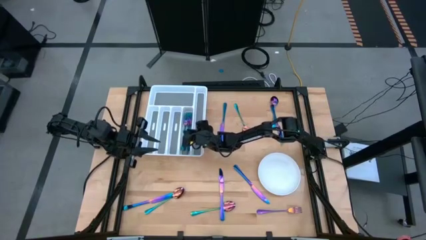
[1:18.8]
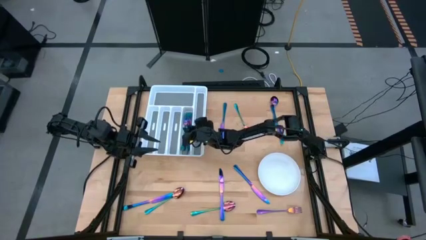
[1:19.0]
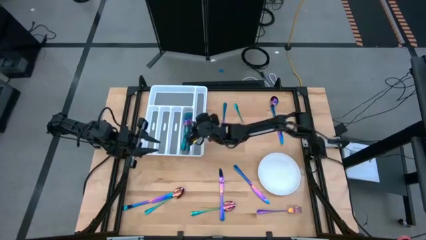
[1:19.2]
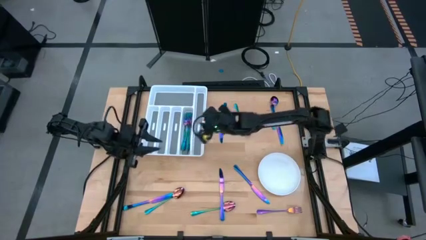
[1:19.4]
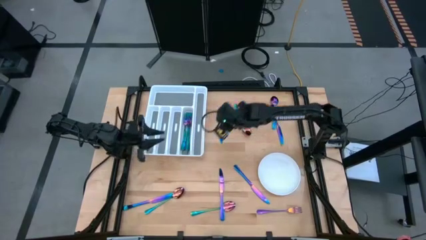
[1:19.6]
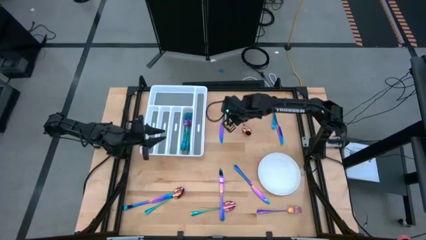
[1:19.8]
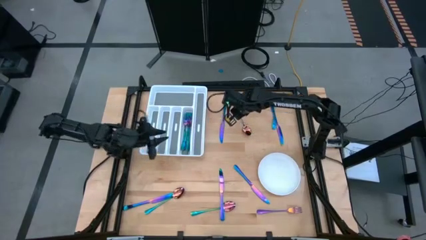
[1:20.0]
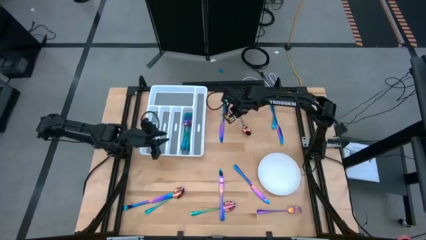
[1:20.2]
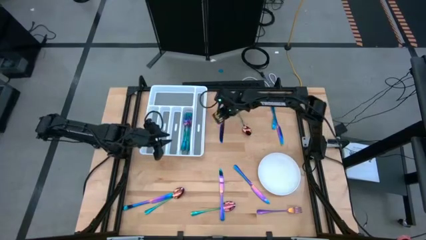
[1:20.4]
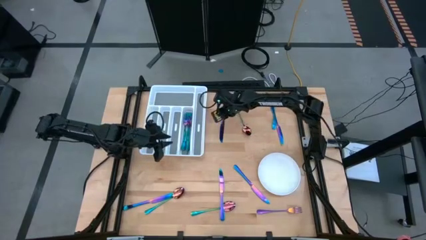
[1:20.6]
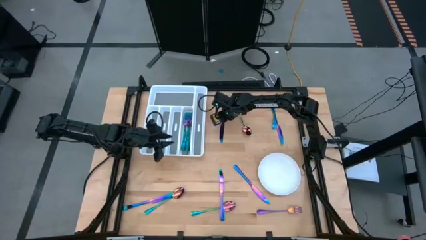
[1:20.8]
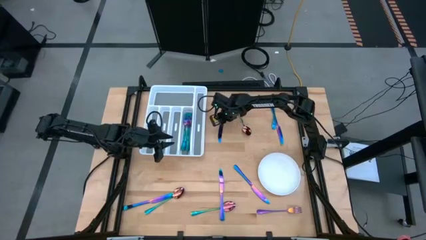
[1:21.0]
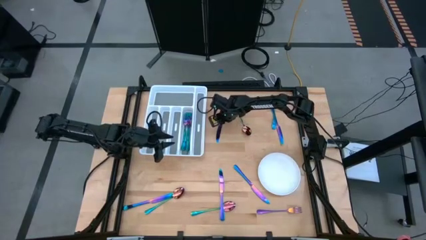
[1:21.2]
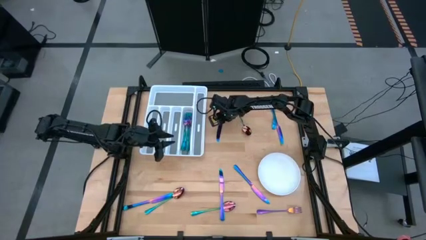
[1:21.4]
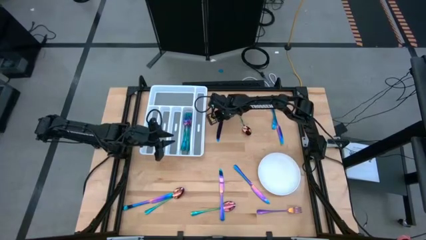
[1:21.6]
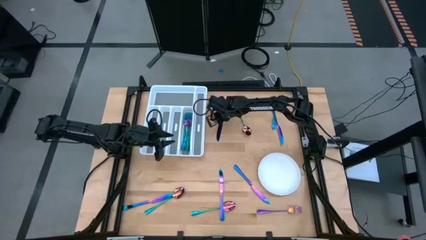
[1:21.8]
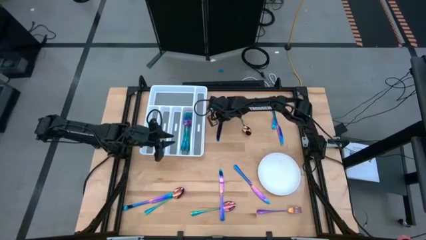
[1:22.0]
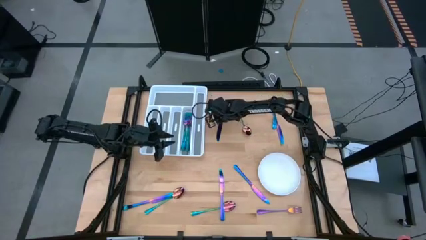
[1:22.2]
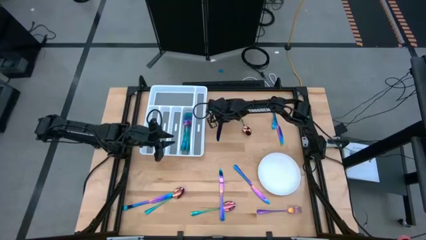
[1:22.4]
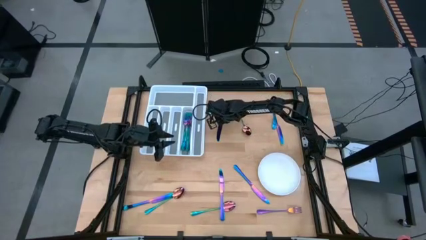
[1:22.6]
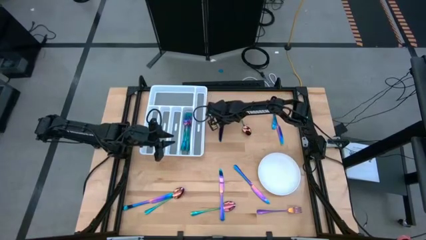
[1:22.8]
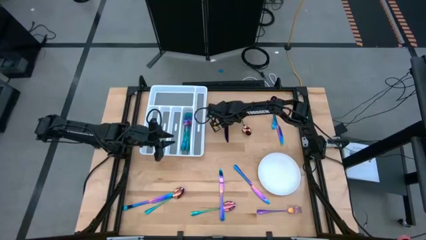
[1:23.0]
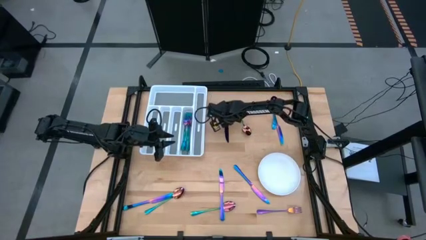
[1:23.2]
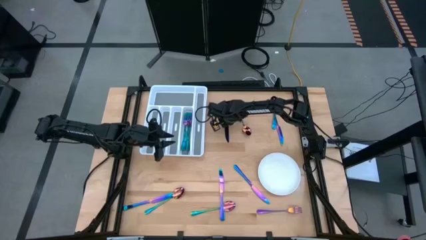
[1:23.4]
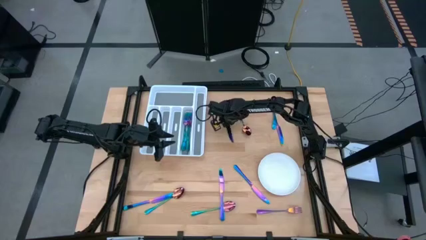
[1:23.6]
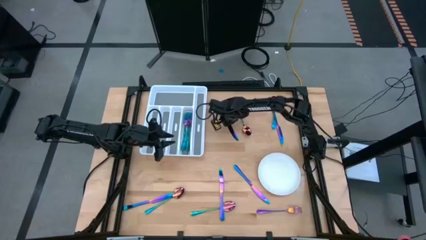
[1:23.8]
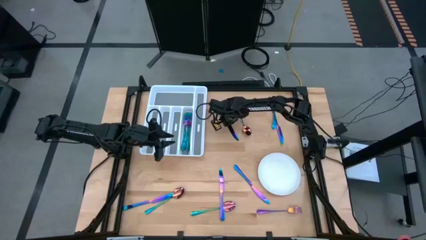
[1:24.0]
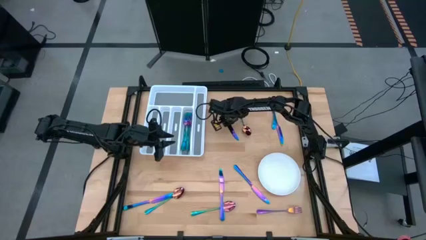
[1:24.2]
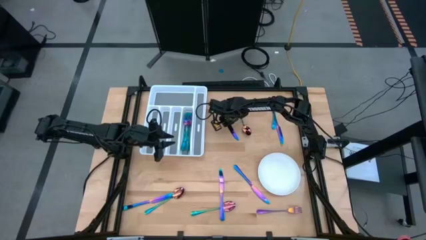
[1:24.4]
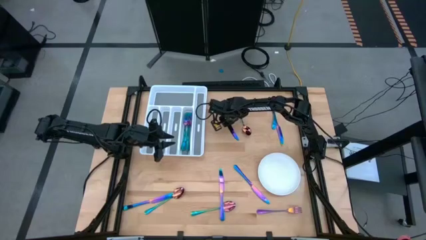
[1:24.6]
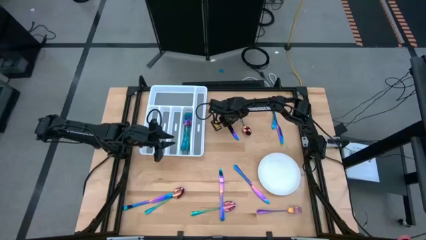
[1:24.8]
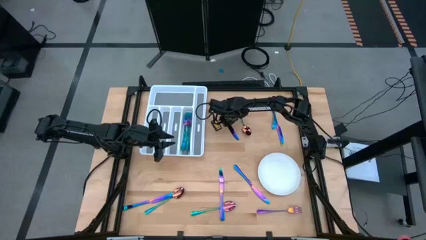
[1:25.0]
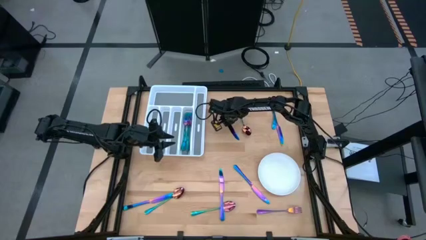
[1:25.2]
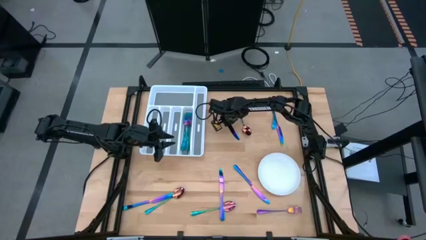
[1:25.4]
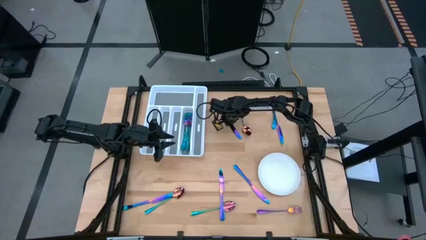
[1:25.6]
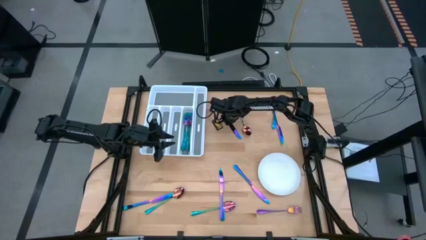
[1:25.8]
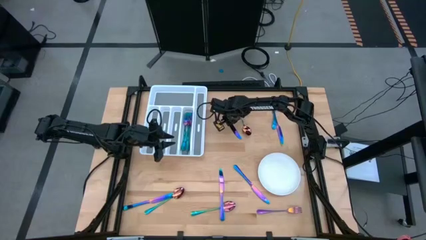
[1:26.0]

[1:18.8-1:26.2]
Task: Sort silverware
Put the iridescent knife into the white silverware tray

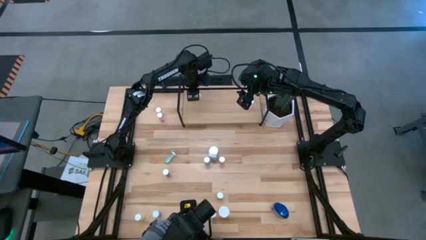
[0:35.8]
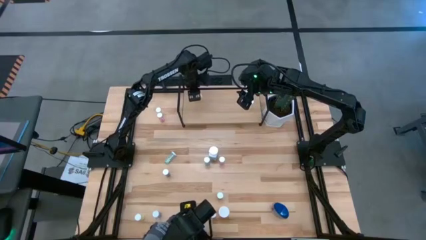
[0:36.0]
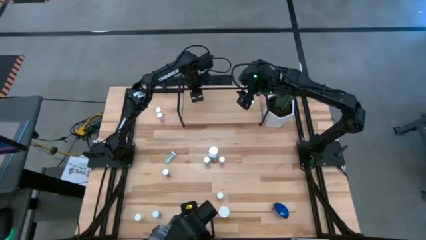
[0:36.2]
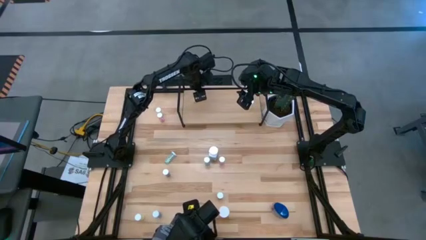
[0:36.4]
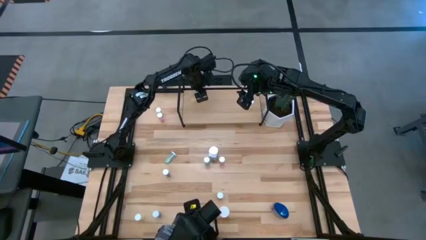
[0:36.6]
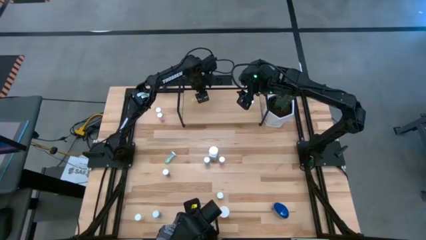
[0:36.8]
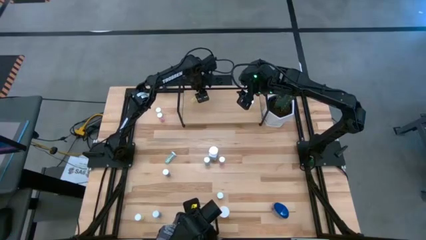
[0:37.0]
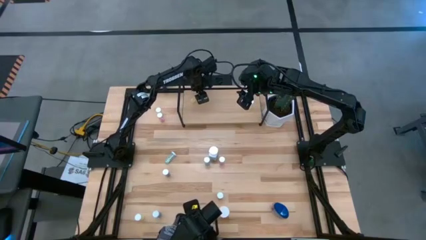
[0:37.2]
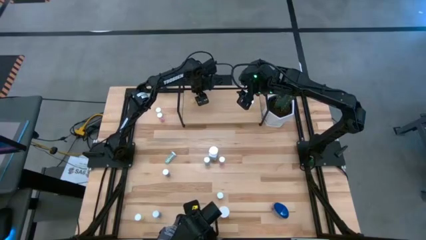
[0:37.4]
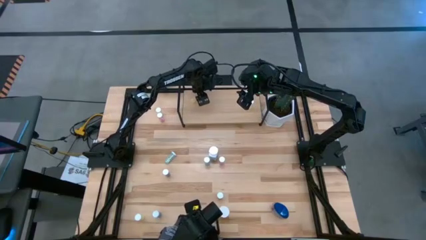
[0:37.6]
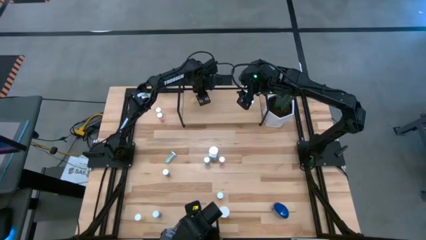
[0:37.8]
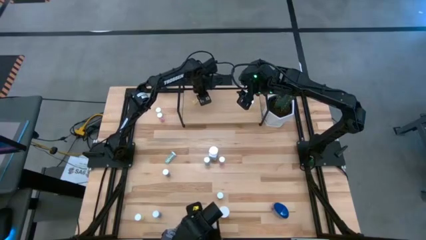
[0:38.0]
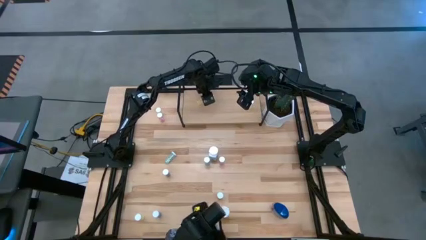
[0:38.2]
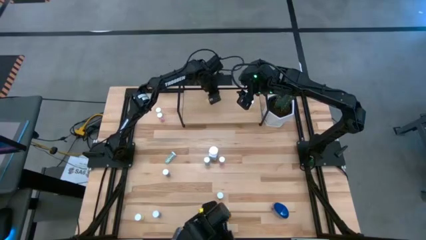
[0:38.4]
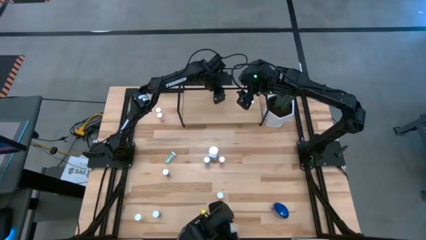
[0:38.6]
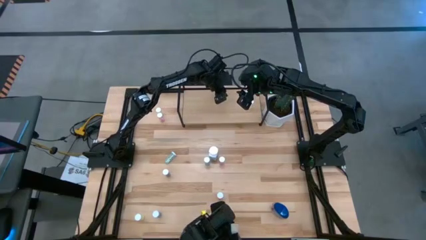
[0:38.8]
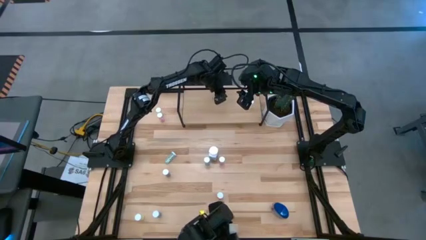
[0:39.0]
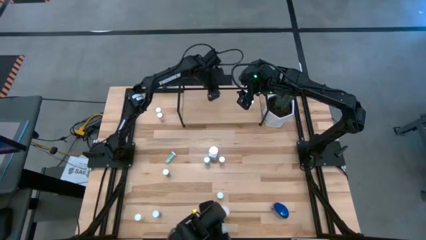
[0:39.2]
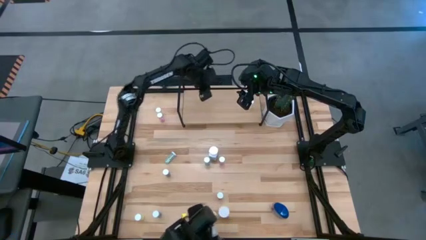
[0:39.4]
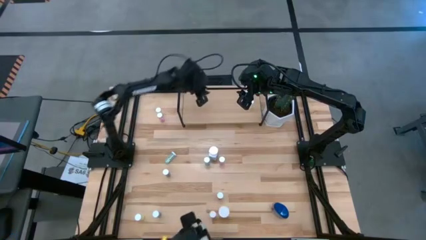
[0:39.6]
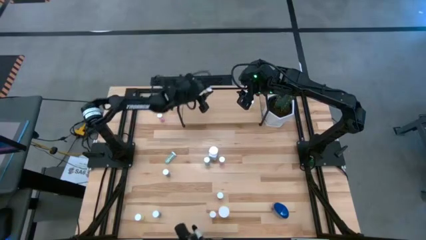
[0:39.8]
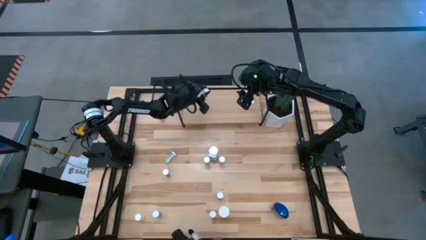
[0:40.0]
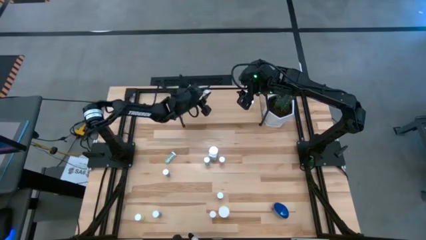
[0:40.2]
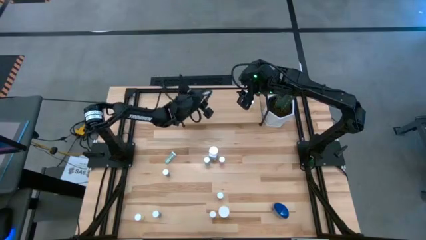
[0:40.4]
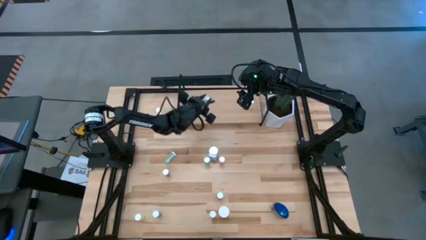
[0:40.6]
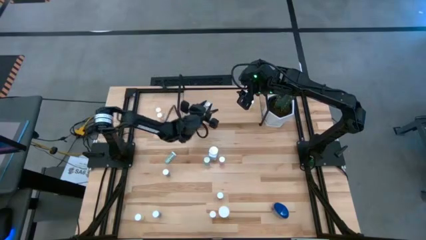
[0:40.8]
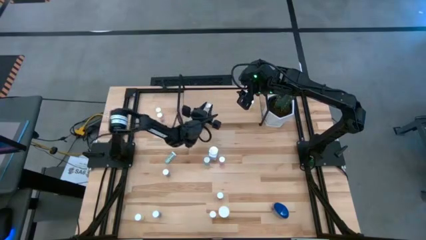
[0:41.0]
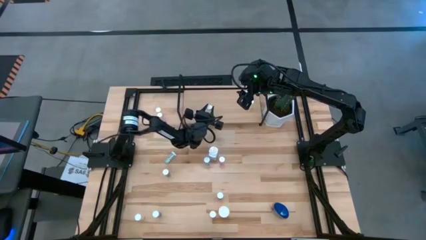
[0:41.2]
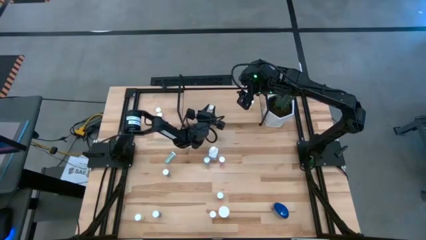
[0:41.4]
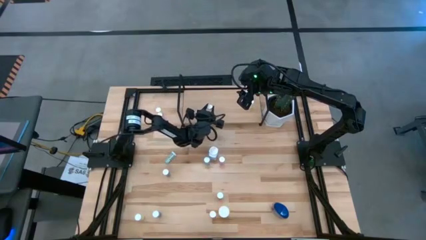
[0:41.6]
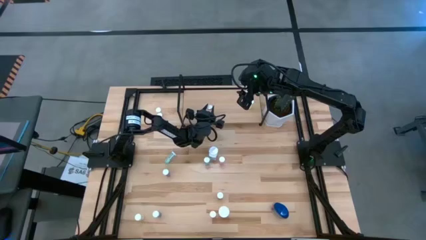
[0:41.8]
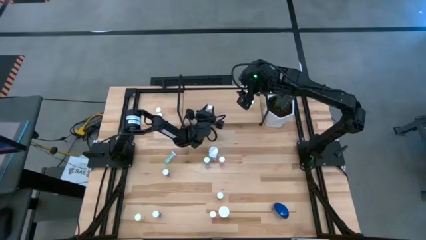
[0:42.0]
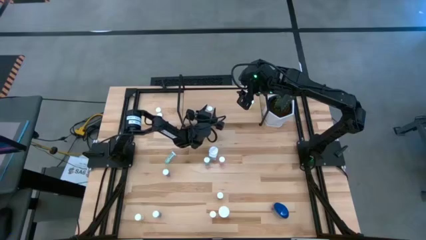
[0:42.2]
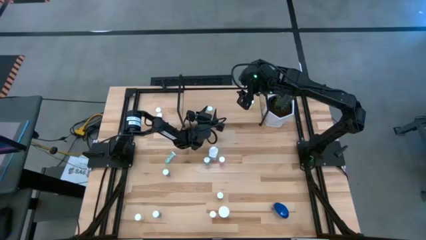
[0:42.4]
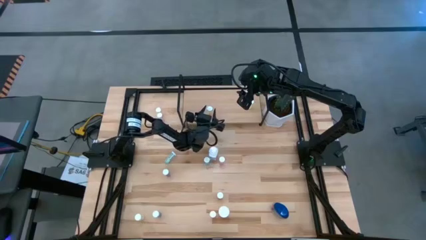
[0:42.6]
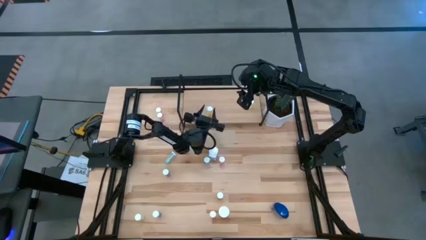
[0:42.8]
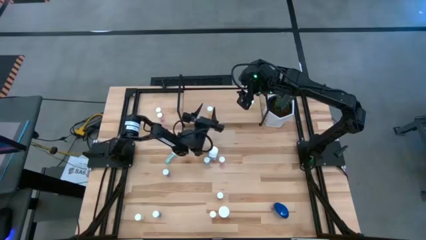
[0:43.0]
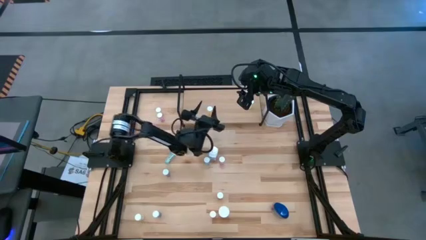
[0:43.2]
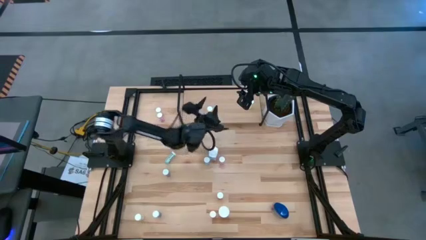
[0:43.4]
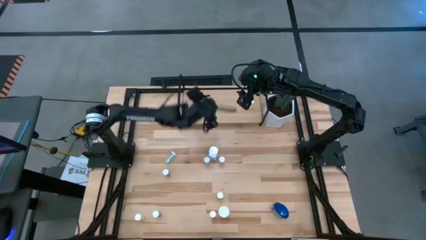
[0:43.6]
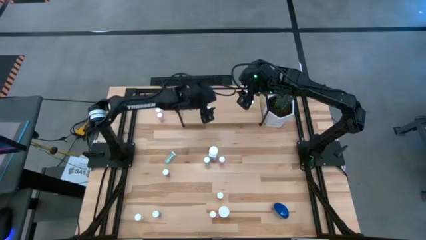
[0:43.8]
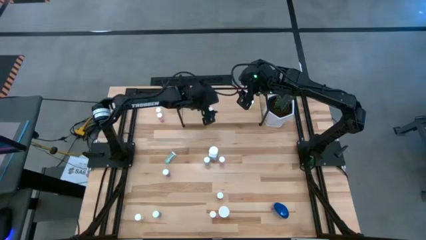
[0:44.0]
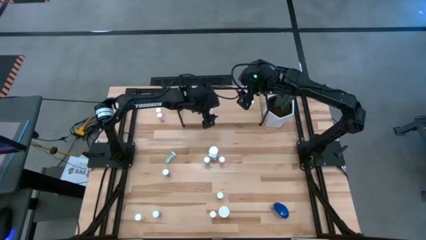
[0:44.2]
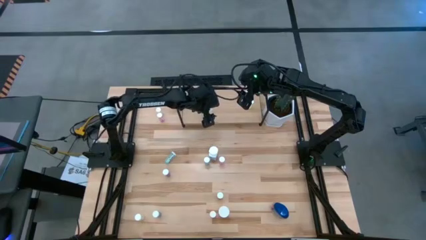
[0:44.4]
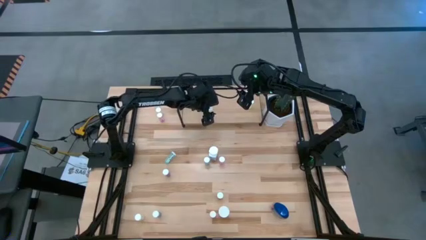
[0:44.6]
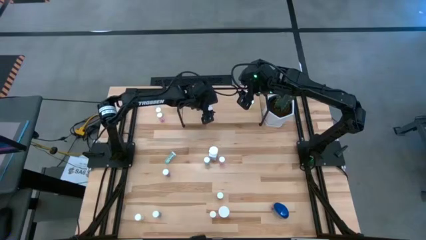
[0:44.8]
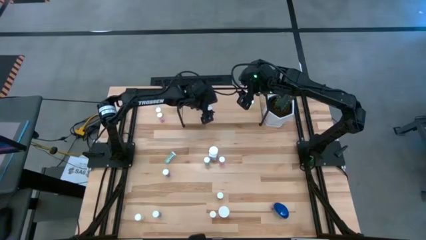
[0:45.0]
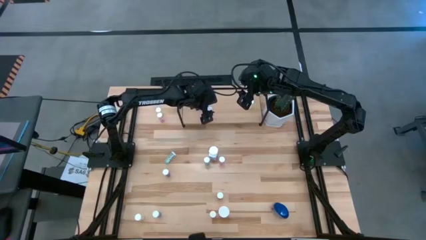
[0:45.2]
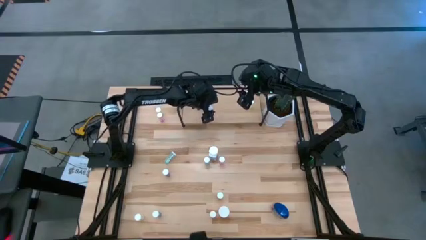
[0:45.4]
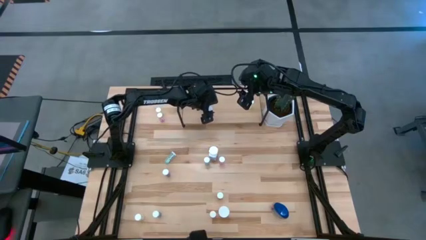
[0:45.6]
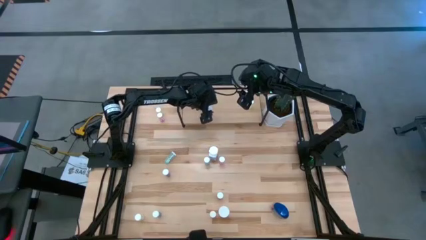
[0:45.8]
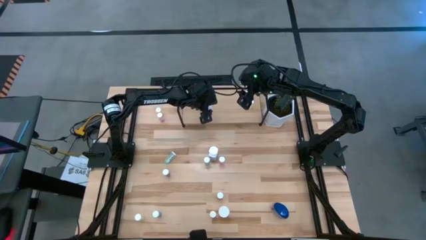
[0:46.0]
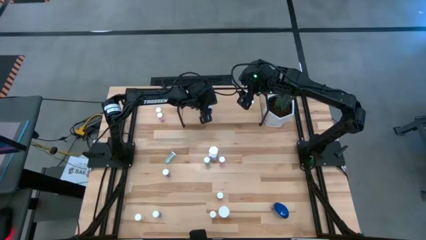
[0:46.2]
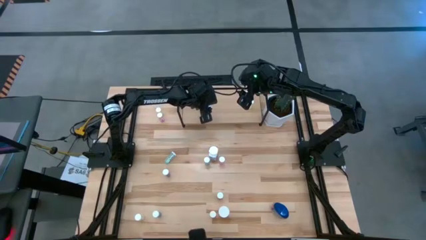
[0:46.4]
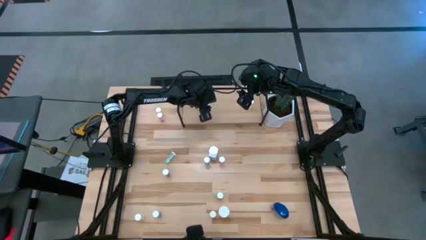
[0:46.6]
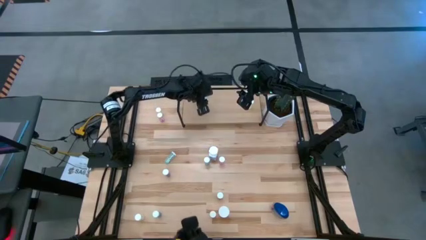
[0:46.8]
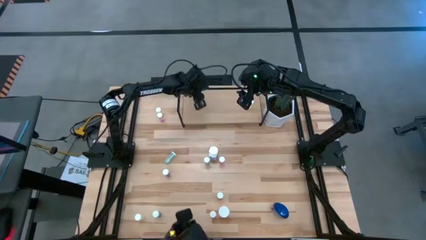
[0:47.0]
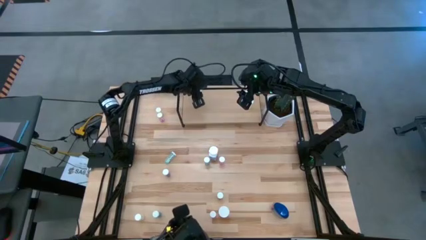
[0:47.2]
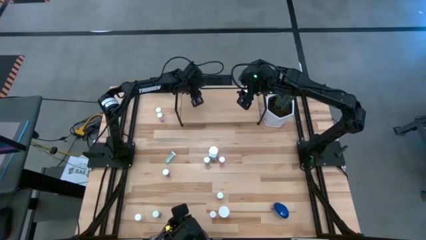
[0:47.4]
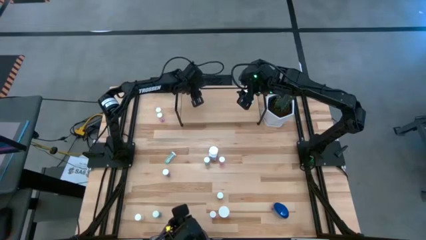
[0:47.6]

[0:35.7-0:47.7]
Task: Pick and place medicine bottles onto shelf by color
Put the yellow pill bottle on the shelf
